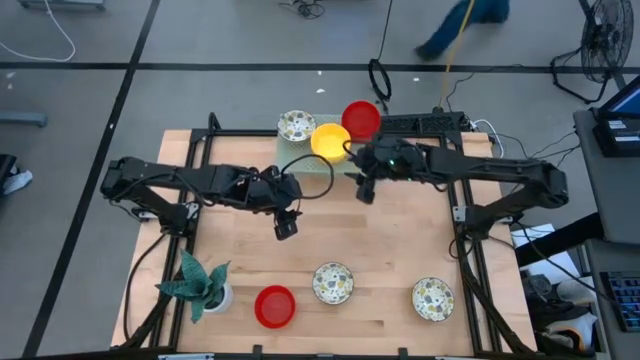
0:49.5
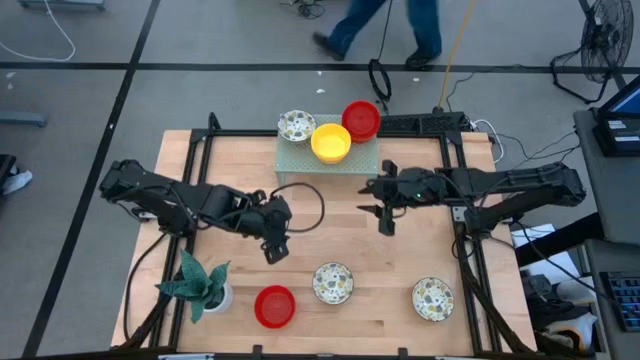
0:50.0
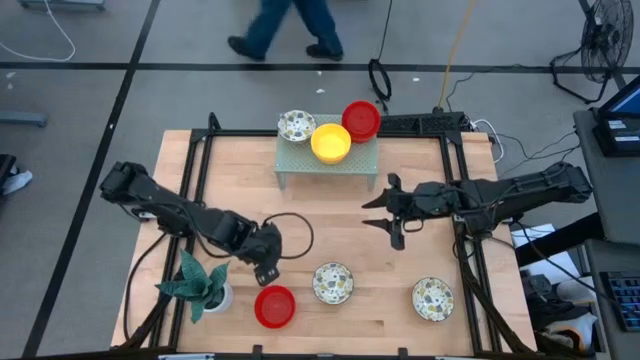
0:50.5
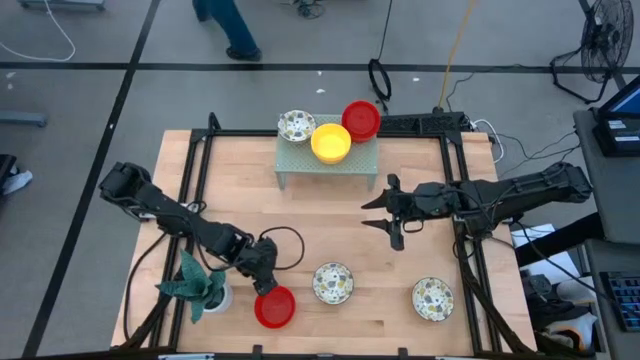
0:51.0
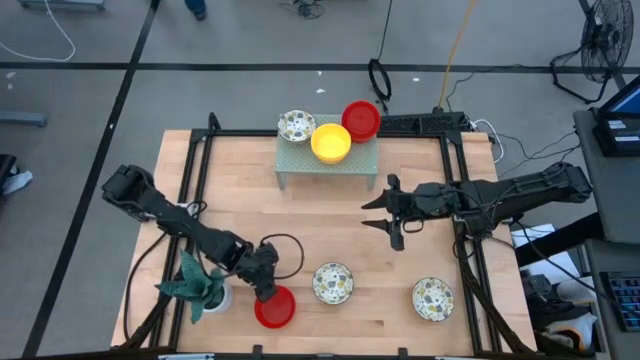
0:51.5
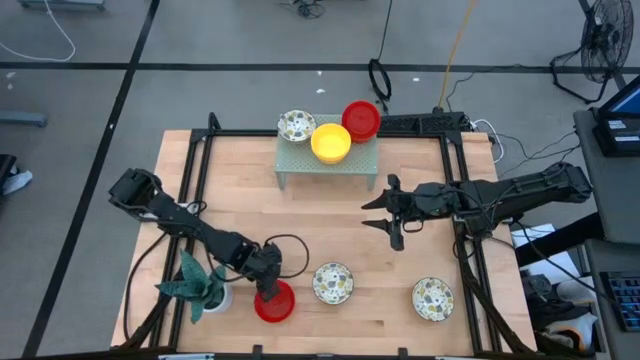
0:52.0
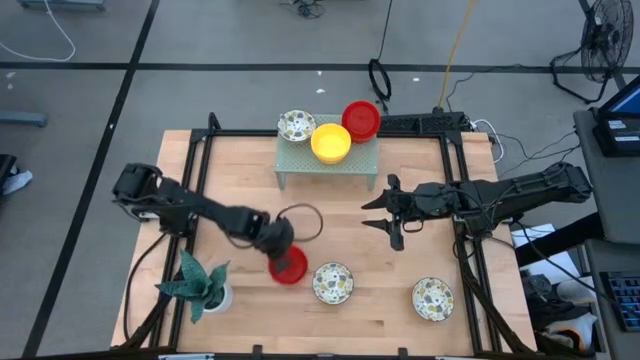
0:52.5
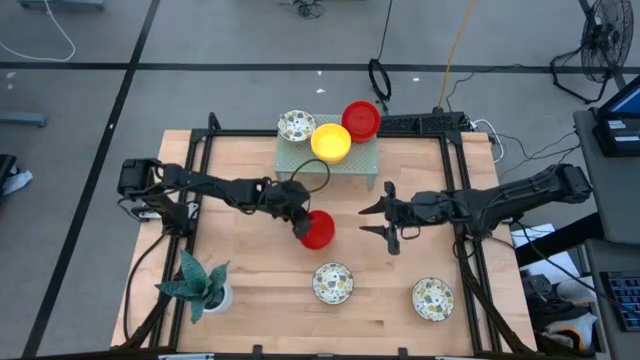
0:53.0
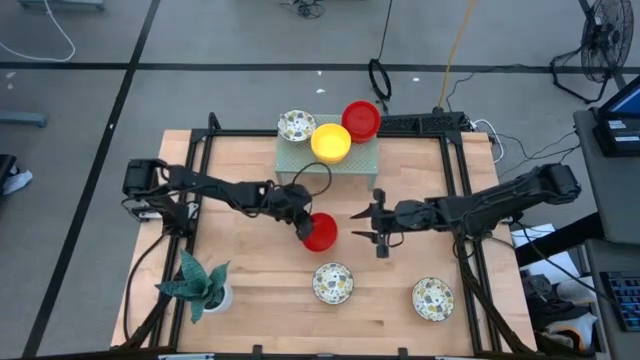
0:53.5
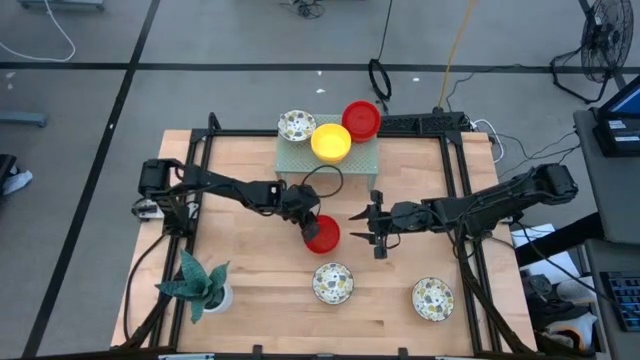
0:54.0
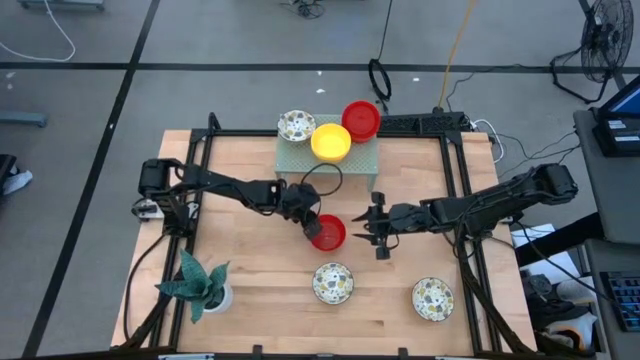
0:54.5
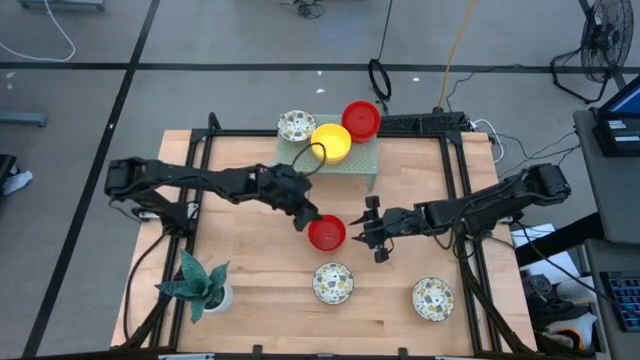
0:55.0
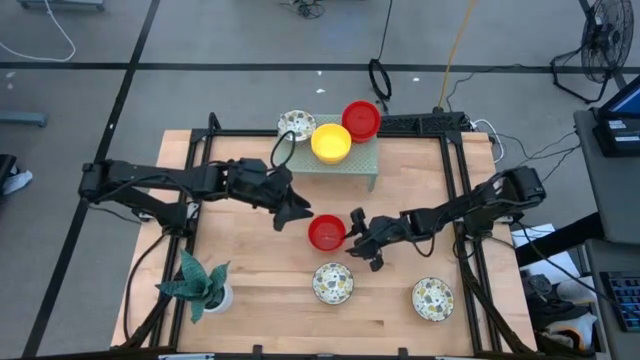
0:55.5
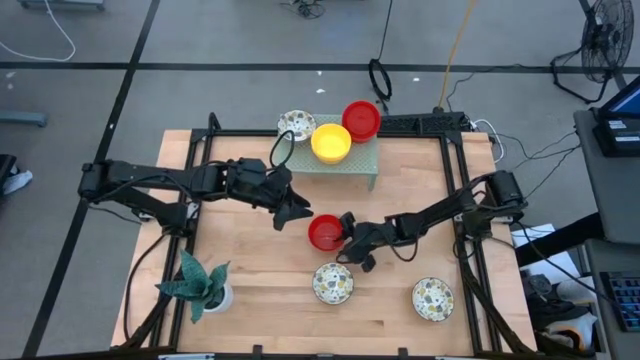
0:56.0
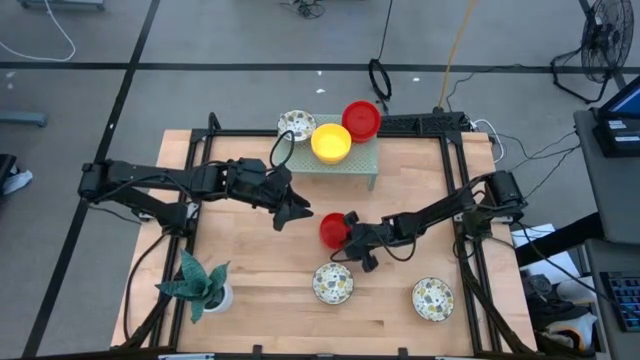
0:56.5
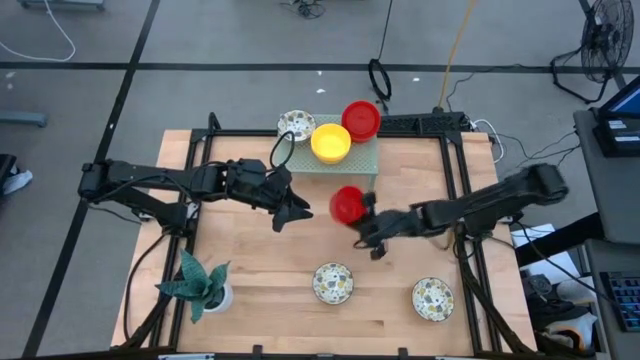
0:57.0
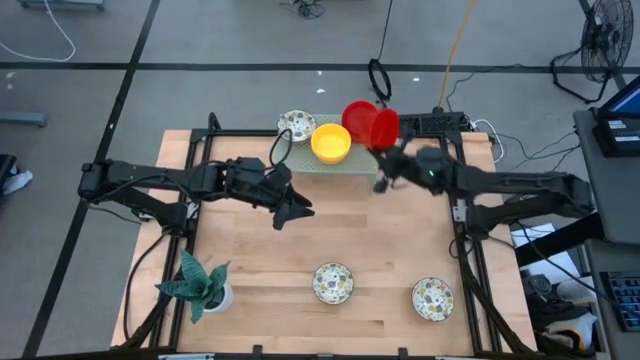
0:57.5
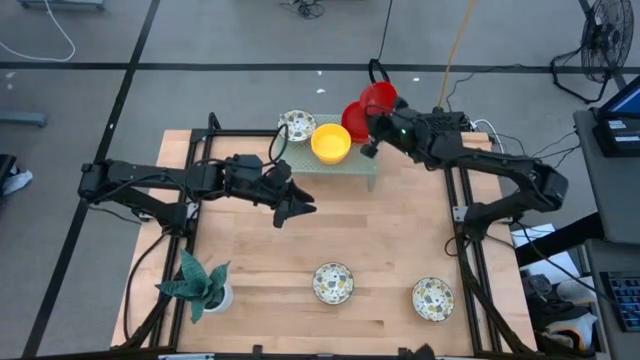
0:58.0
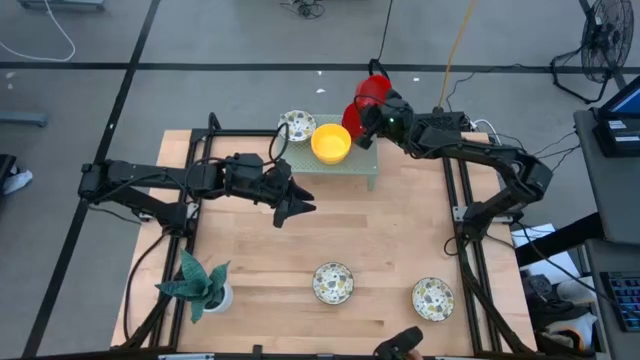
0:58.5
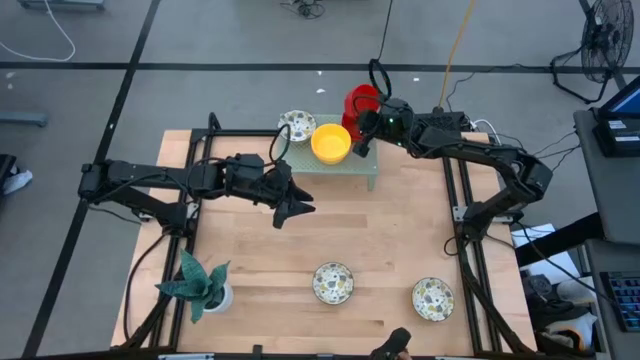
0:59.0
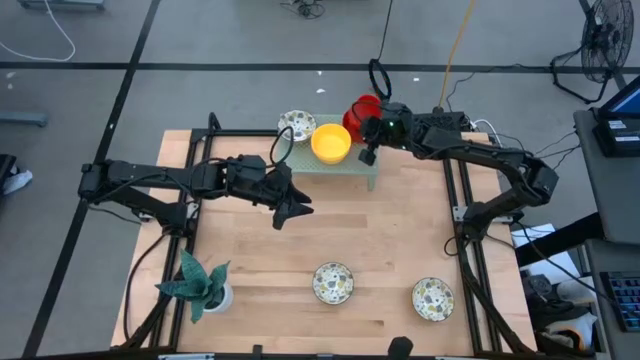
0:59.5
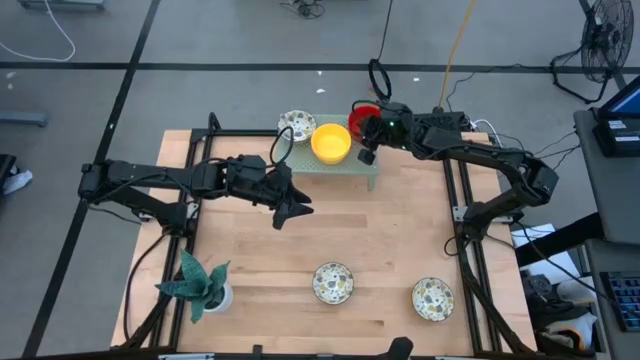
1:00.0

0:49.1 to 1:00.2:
Task: Pick & Place Mini bowls
Stack the red bowl on top of the other red bowl on the shelf

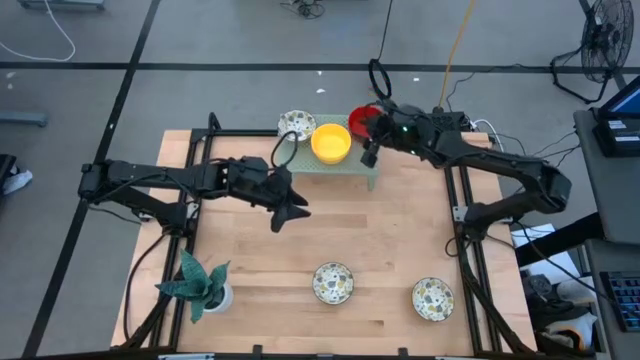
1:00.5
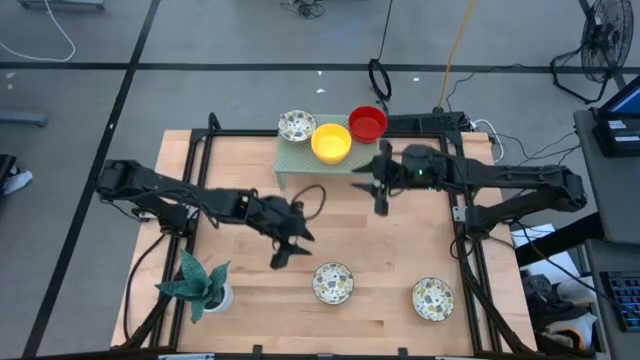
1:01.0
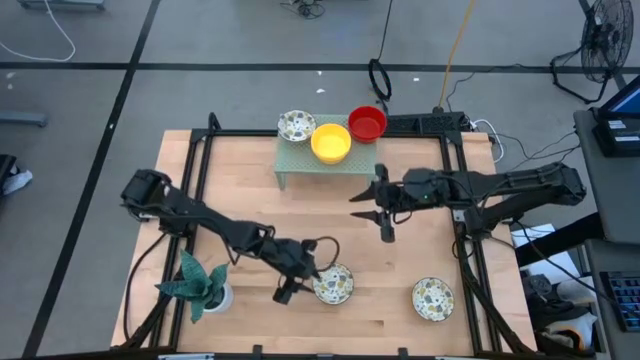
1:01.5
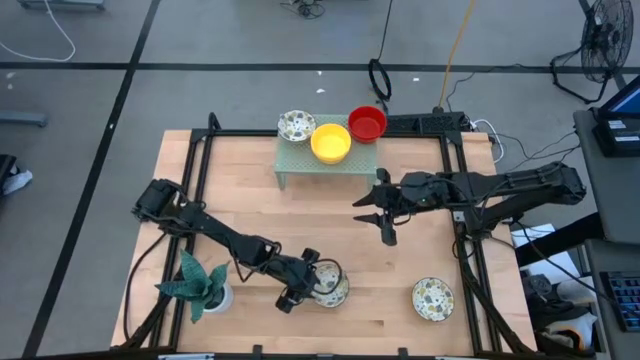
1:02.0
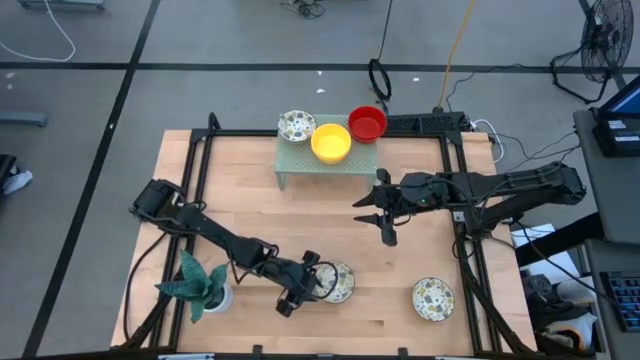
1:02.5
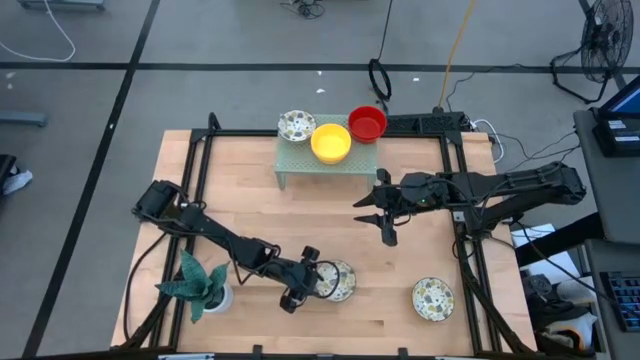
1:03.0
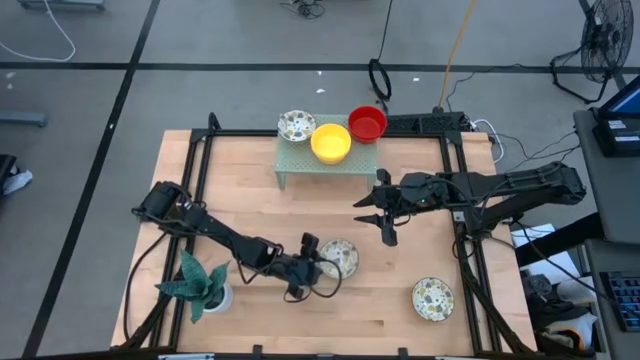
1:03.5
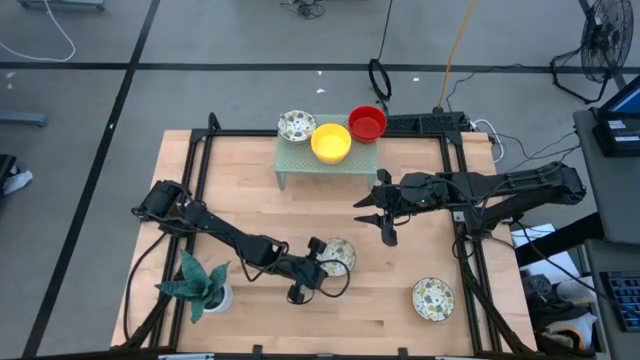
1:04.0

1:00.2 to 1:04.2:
Stack the white patterned bowl on top of the other white patterned bowl on the shelf

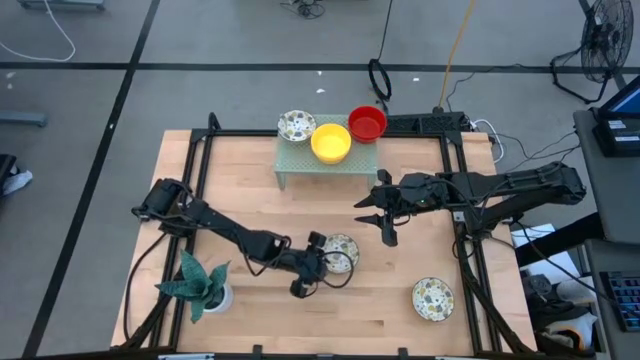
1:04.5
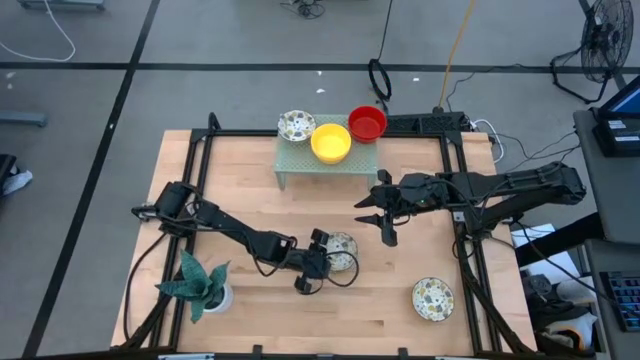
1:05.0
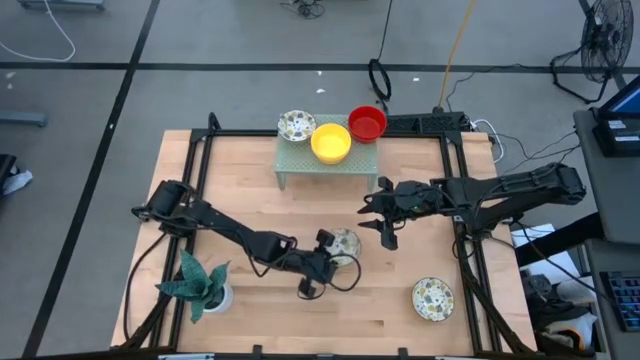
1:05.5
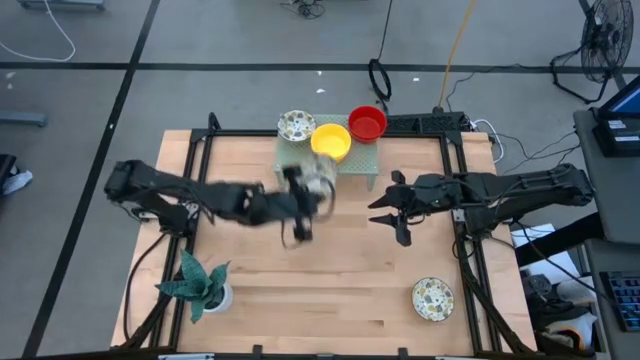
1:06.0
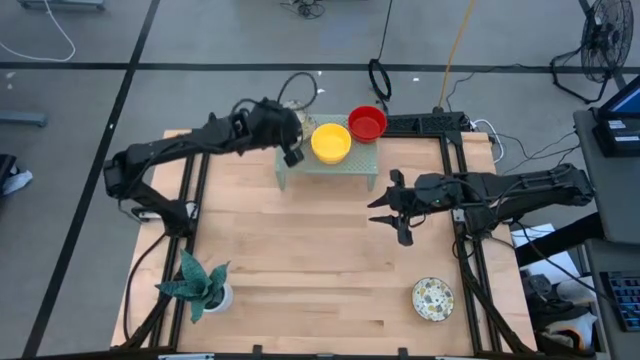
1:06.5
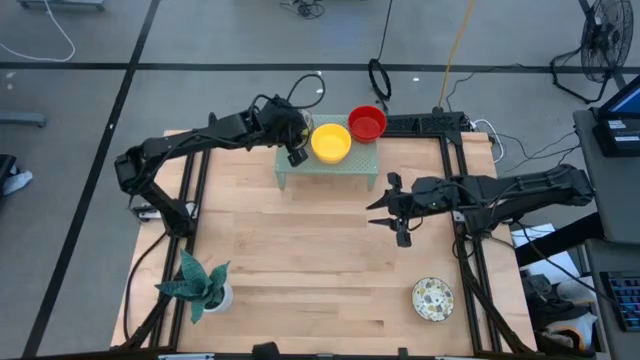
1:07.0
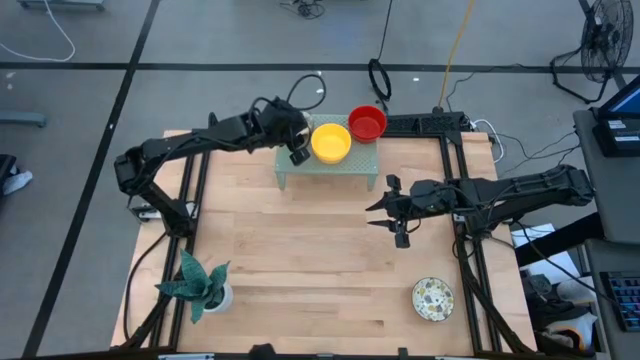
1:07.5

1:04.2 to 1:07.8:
Stack the white patterned bowl on top of the other white patterned bowl on the shelf

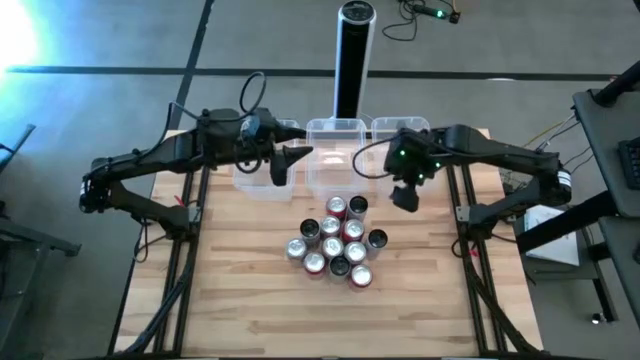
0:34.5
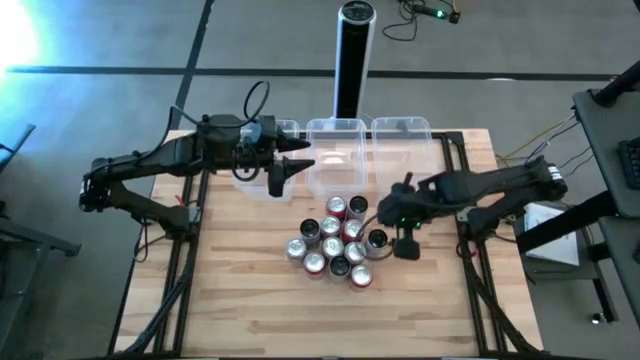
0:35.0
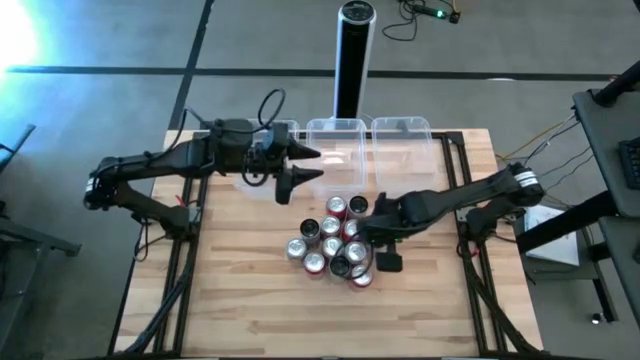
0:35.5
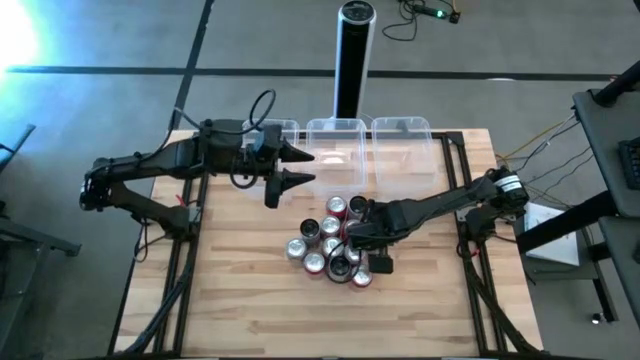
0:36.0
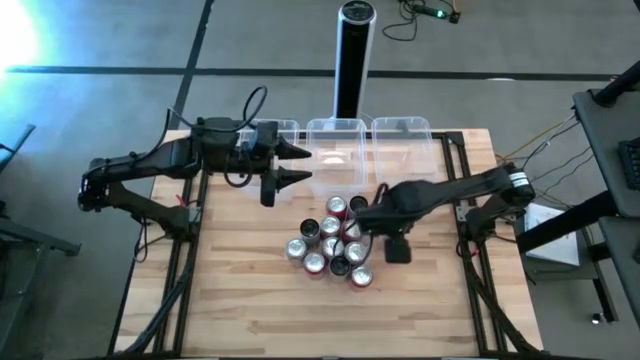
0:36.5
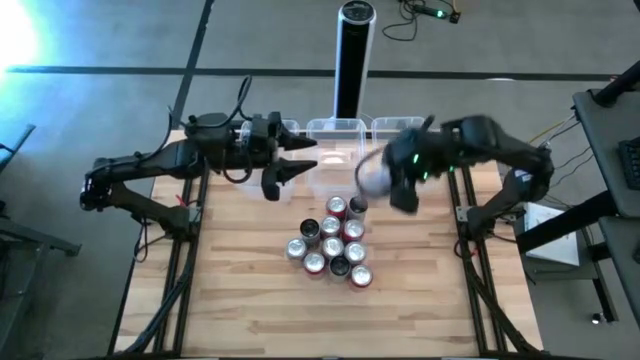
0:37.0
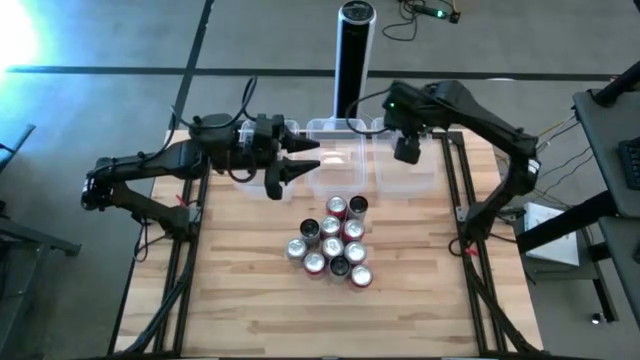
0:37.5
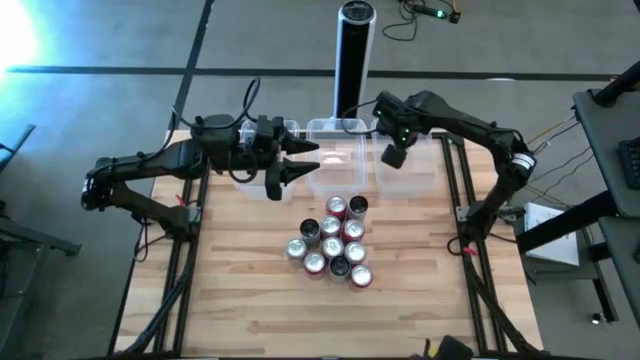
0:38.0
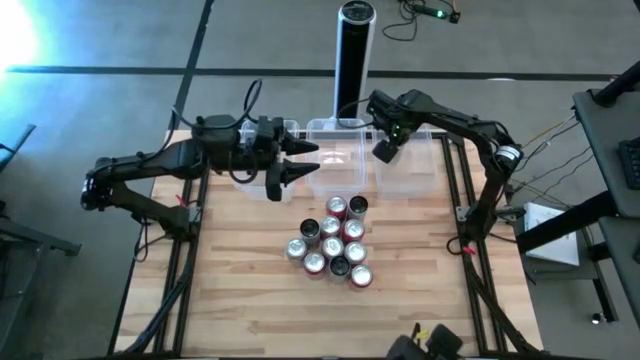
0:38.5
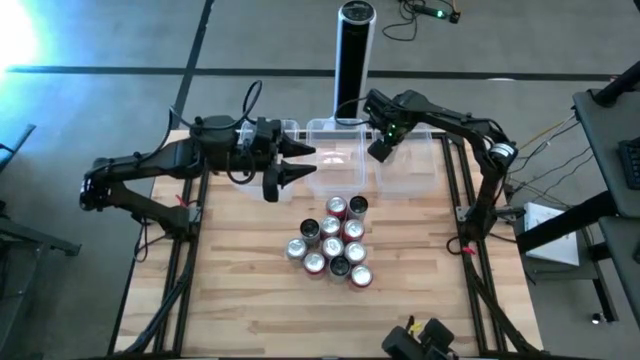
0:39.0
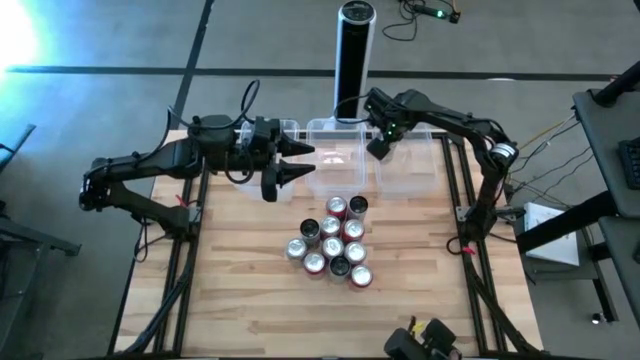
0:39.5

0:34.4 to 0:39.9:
Task: Sort soda cans
Put the white-pink soda can into the right white bin
